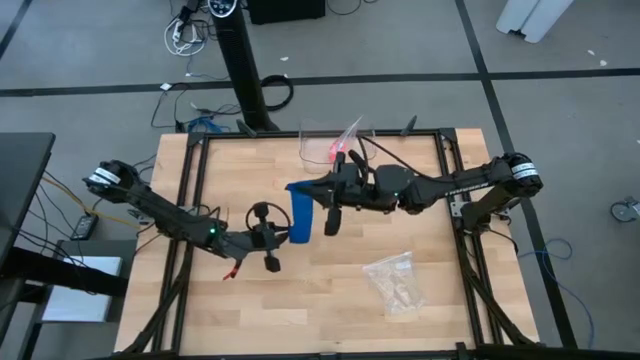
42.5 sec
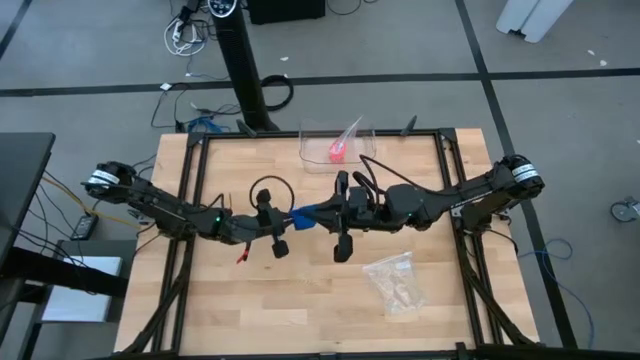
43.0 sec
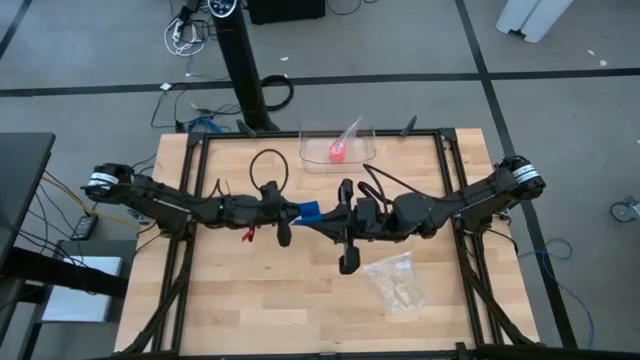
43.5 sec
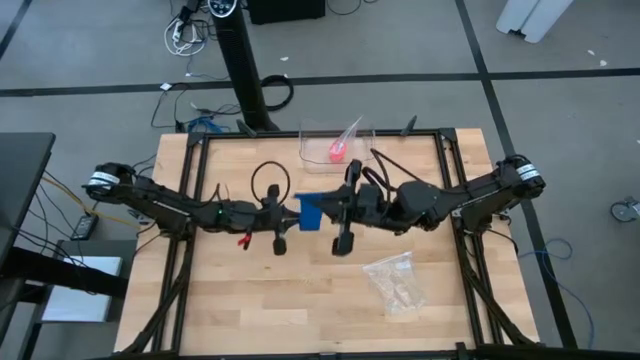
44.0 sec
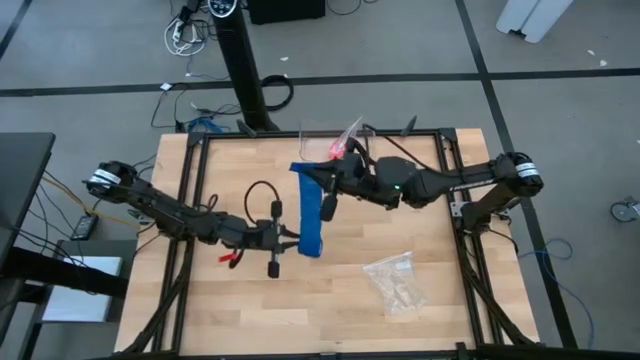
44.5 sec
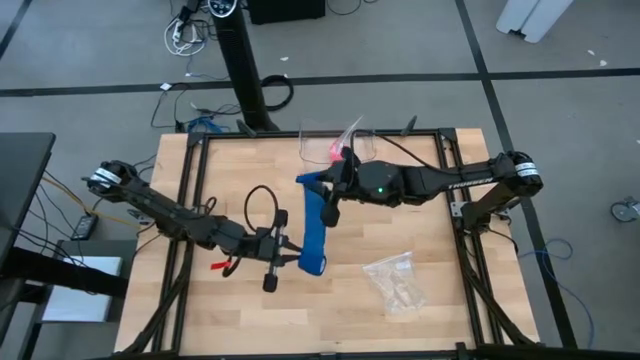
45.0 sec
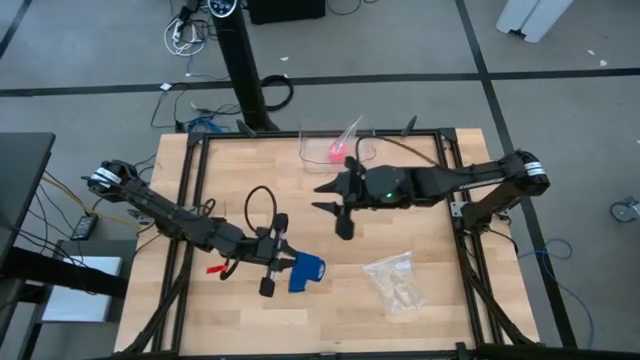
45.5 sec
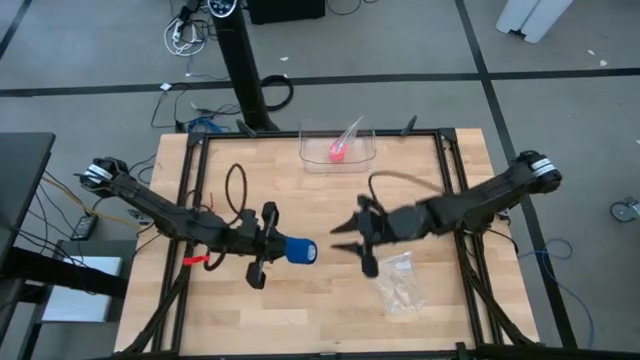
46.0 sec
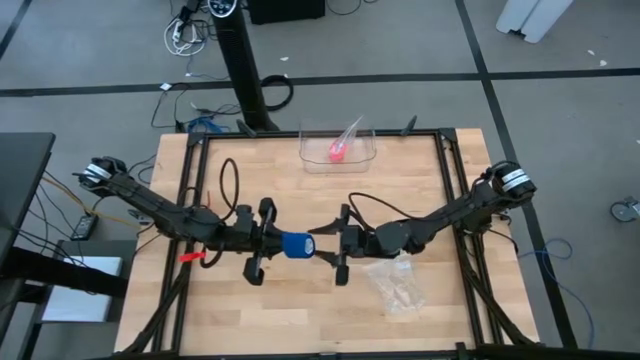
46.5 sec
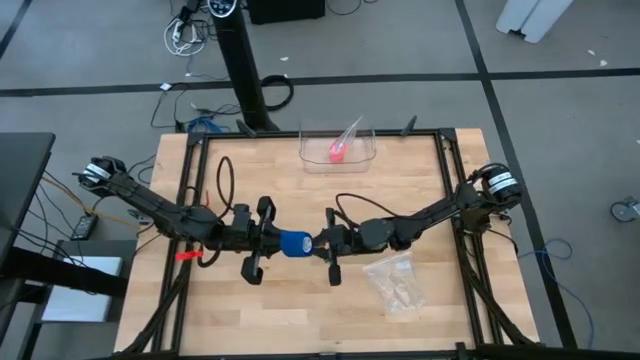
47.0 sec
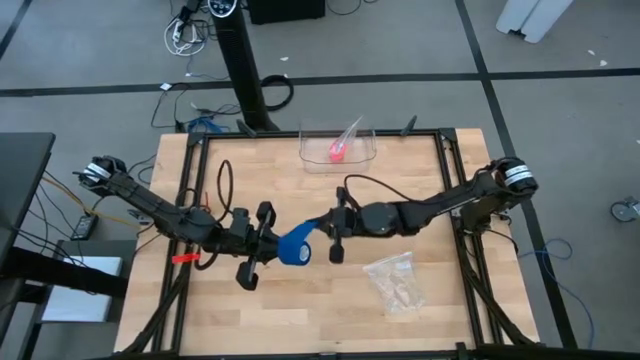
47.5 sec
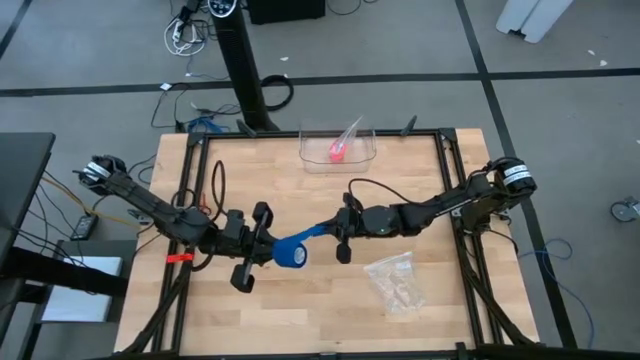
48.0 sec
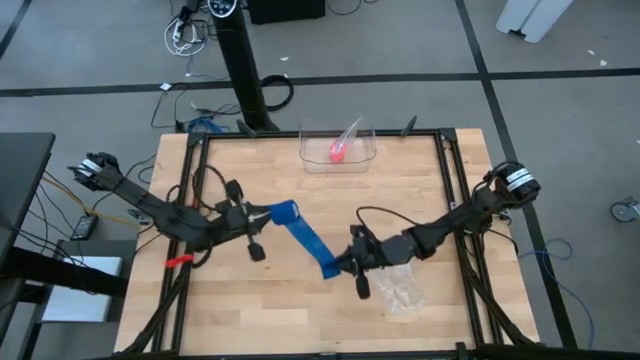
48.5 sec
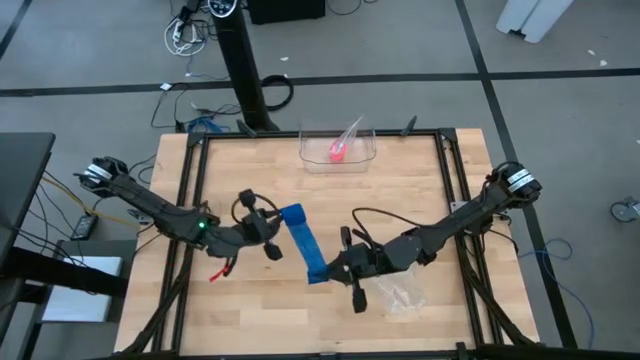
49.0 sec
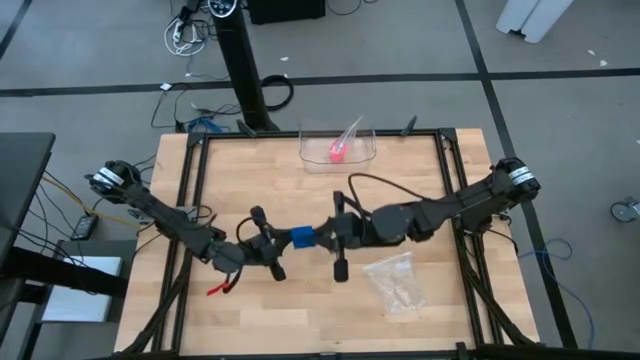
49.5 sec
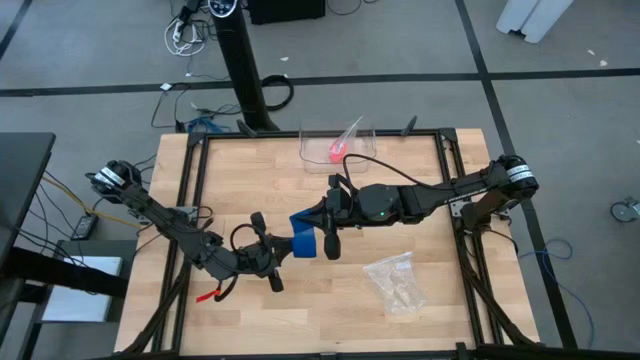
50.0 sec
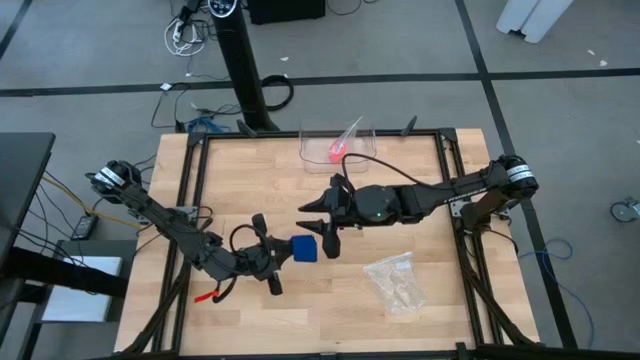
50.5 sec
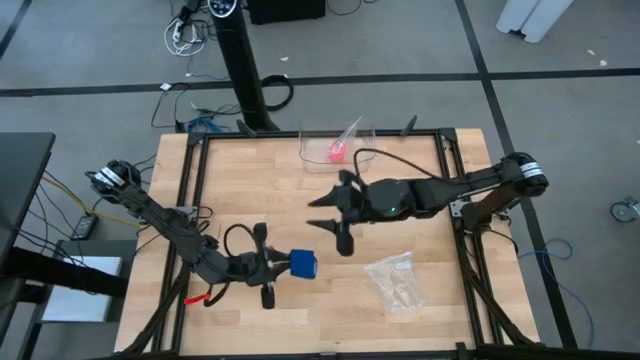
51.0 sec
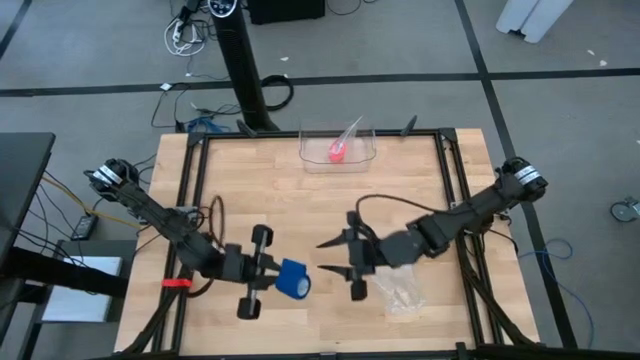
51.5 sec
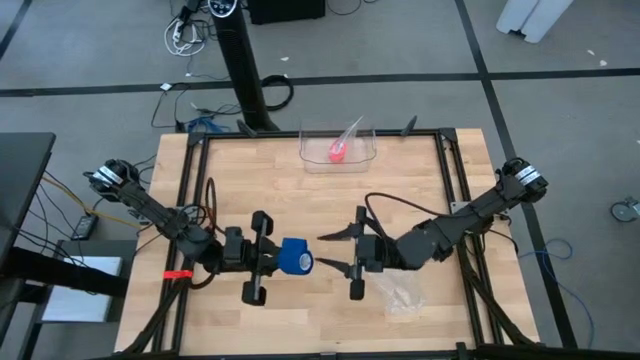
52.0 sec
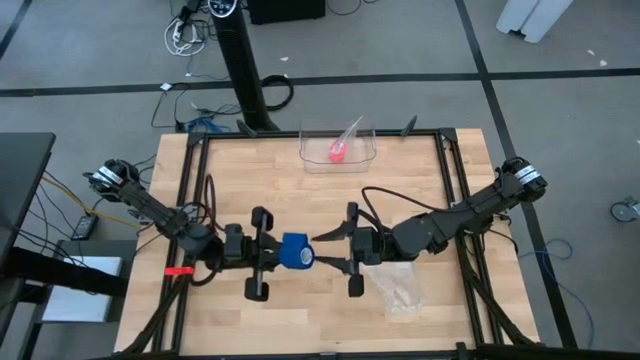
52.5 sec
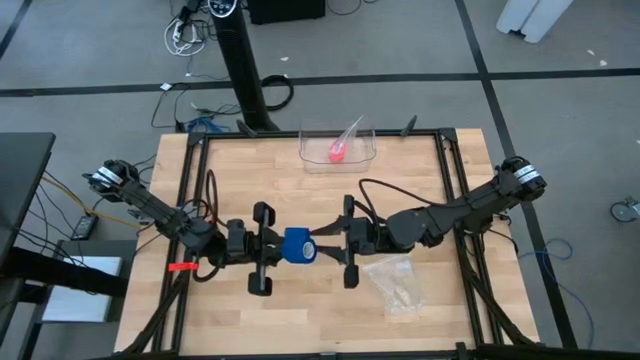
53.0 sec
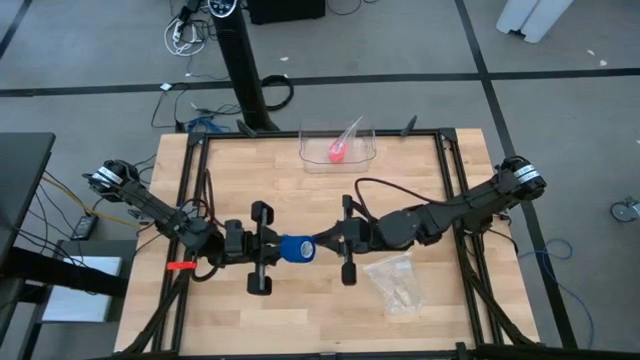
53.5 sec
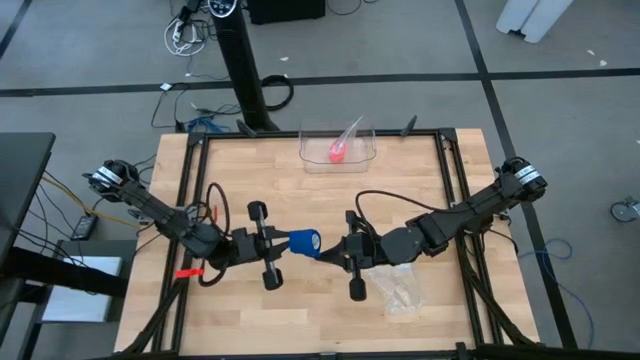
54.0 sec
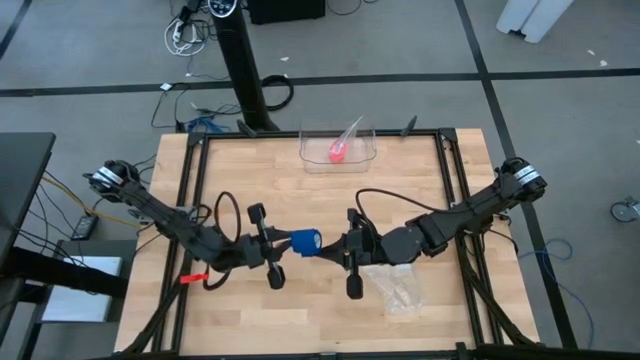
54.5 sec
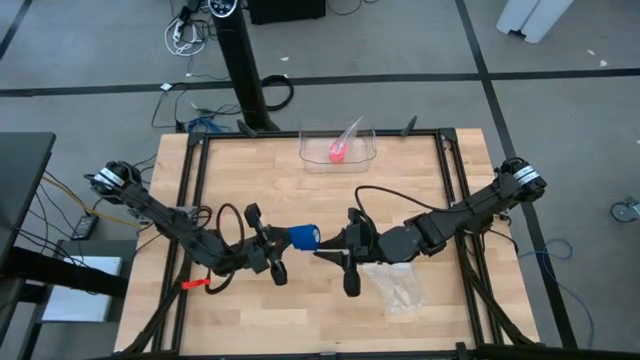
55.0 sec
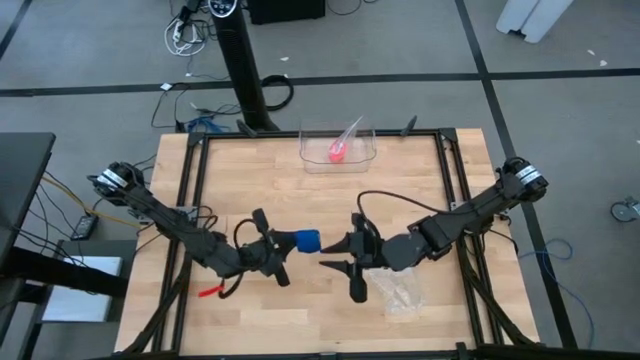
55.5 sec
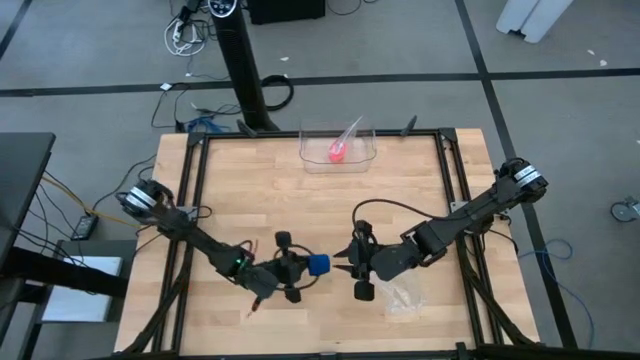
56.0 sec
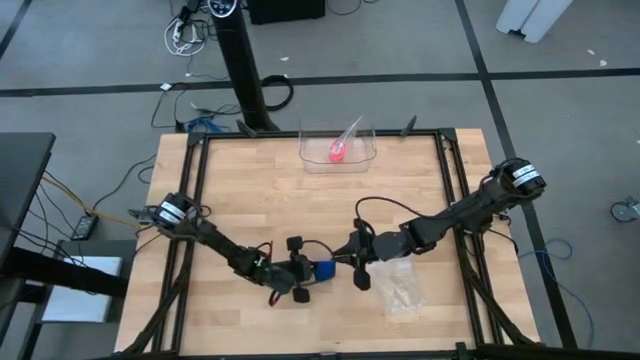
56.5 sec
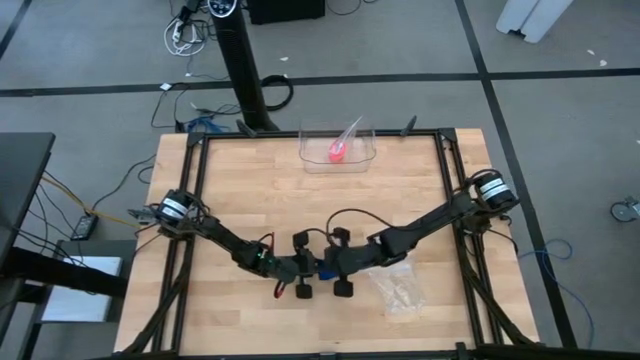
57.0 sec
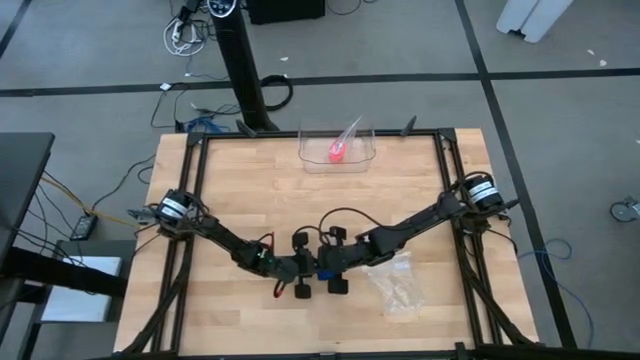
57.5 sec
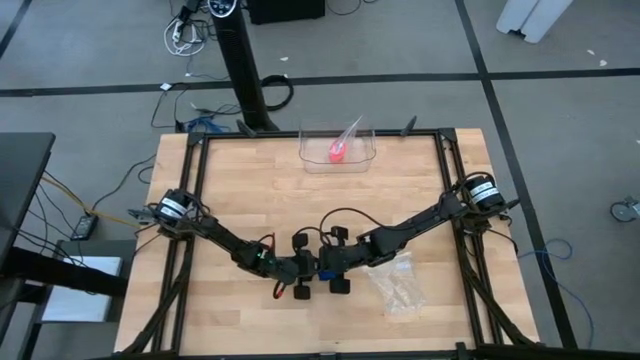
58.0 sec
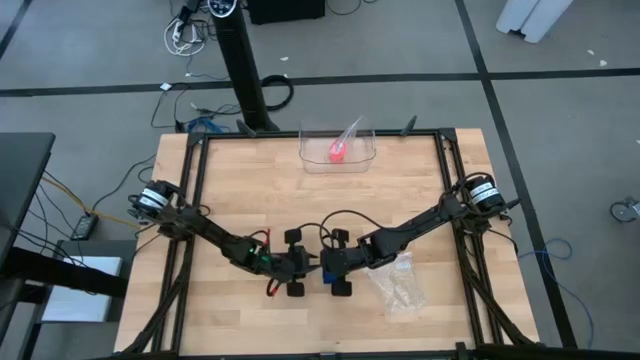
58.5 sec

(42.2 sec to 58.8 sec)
Task: Roll bandage
Roll the blue bandage
